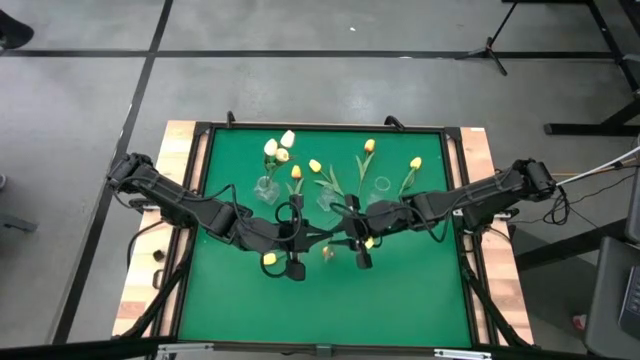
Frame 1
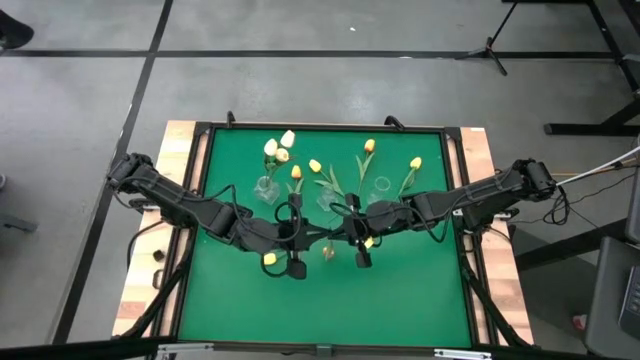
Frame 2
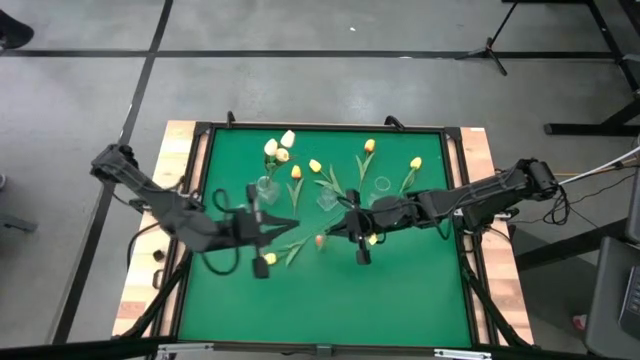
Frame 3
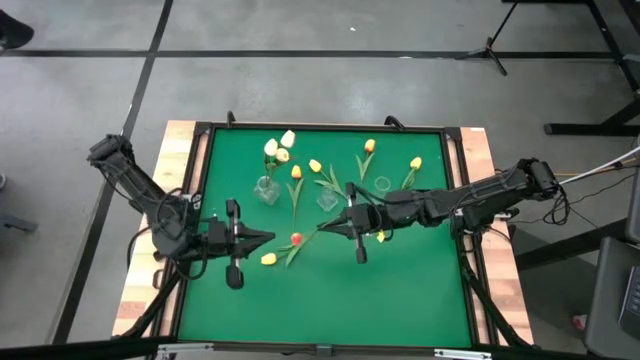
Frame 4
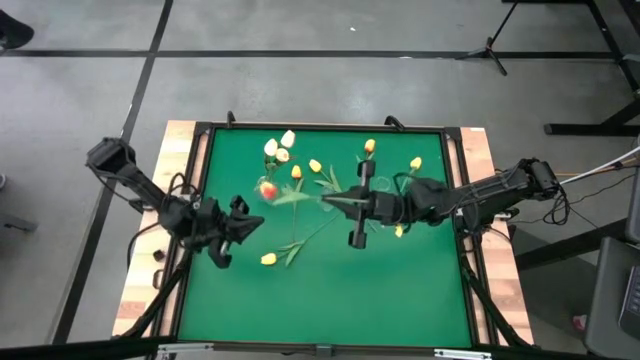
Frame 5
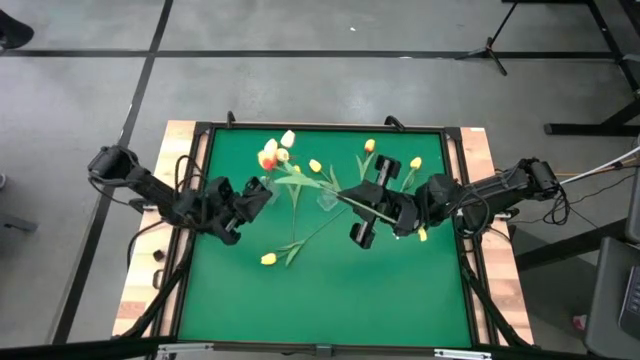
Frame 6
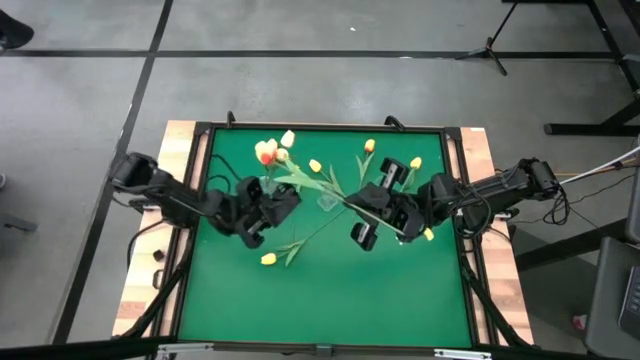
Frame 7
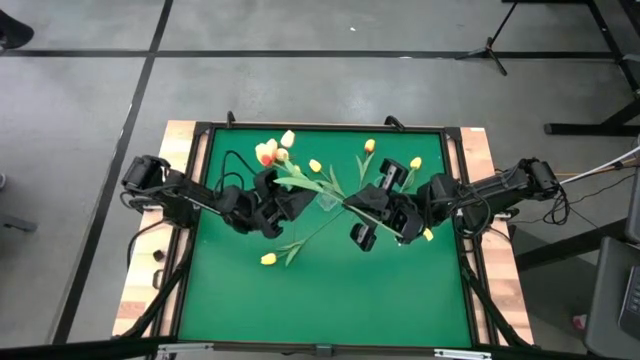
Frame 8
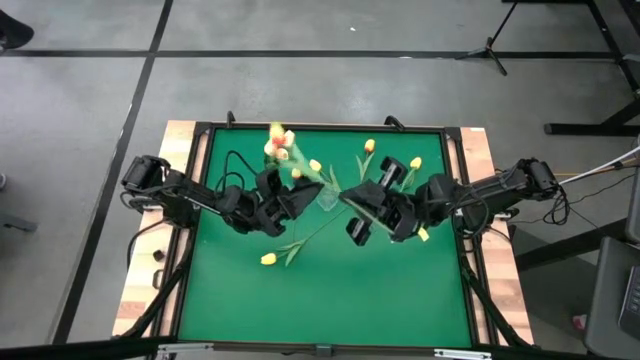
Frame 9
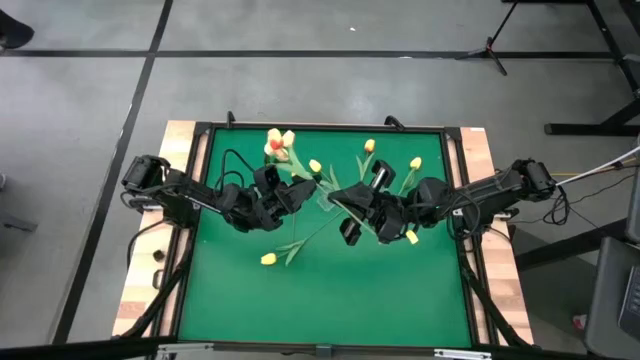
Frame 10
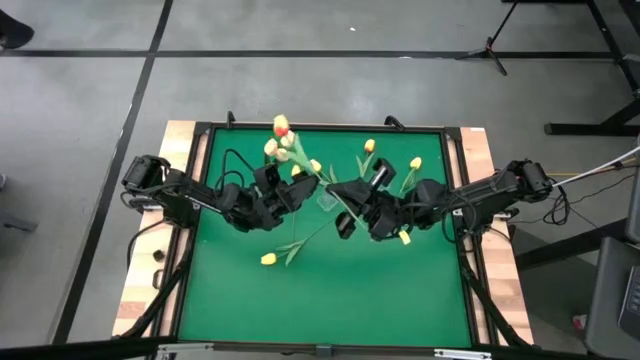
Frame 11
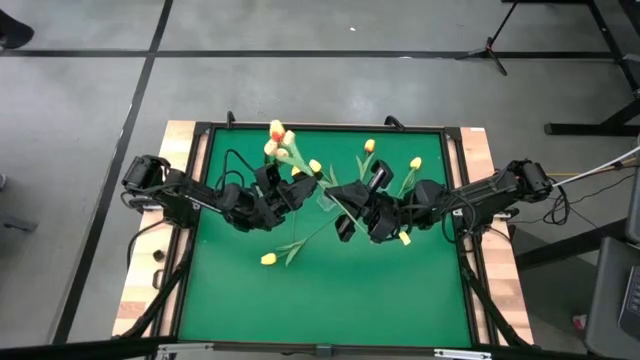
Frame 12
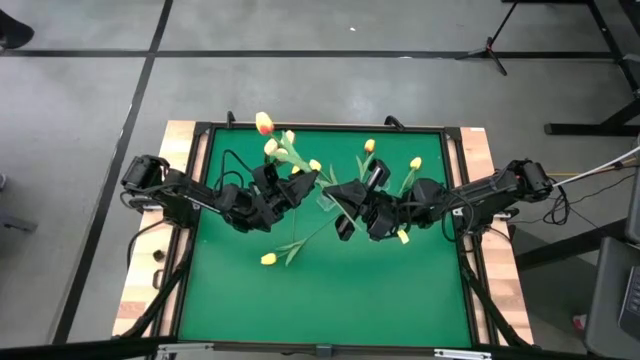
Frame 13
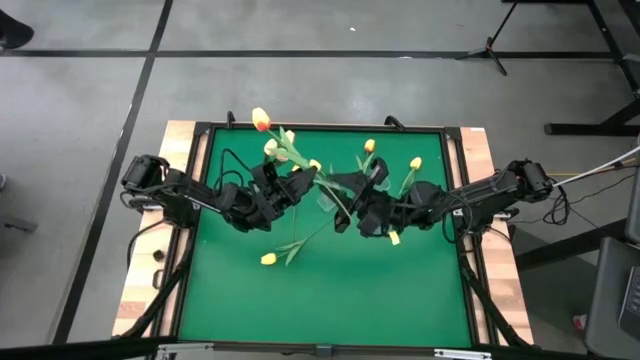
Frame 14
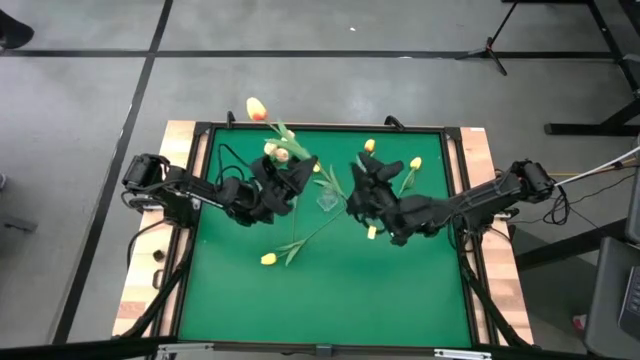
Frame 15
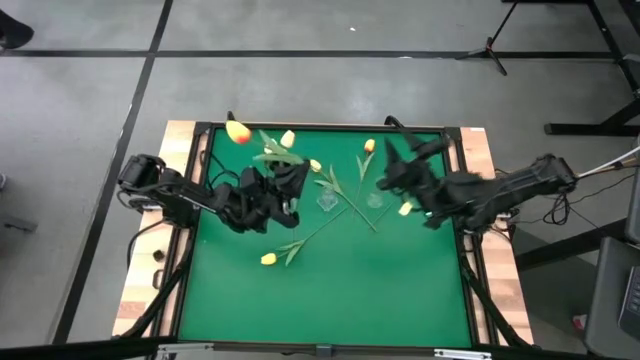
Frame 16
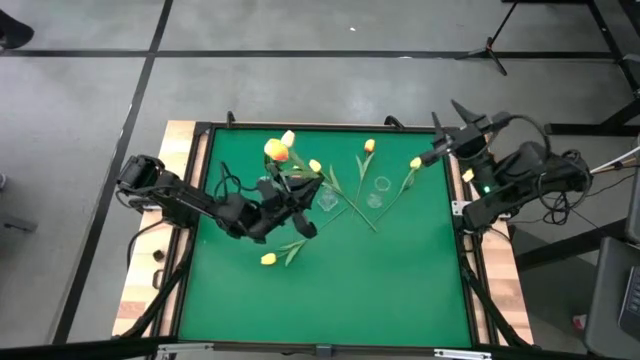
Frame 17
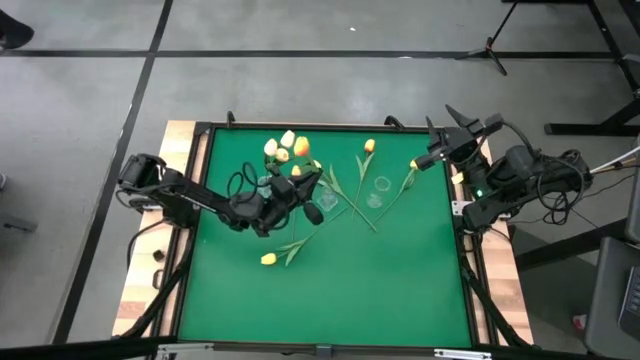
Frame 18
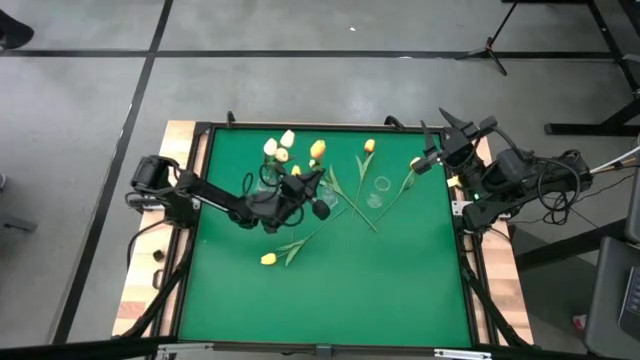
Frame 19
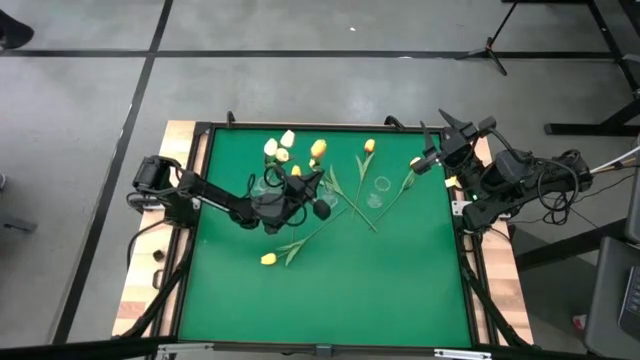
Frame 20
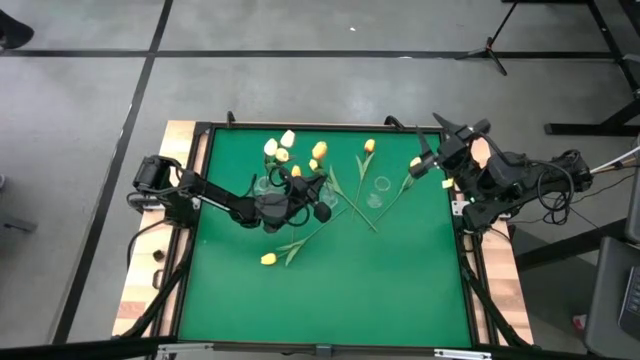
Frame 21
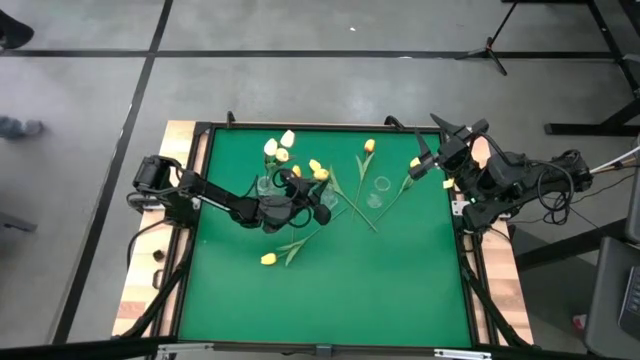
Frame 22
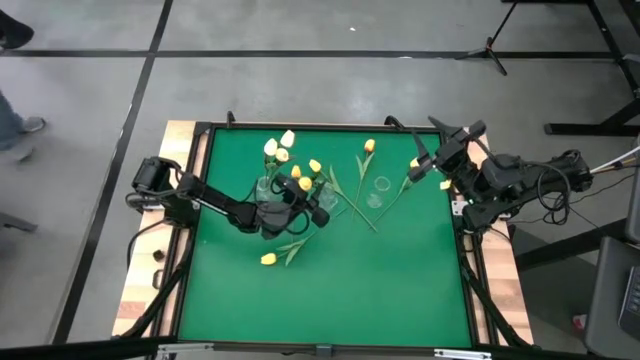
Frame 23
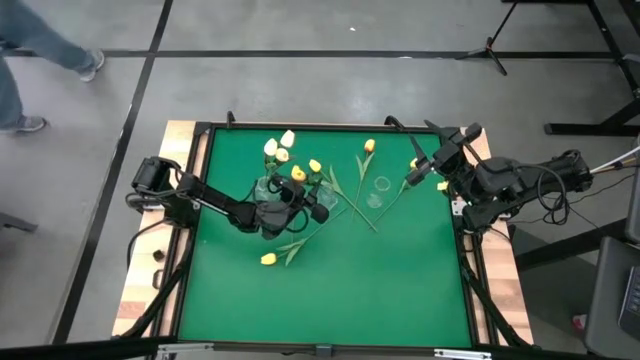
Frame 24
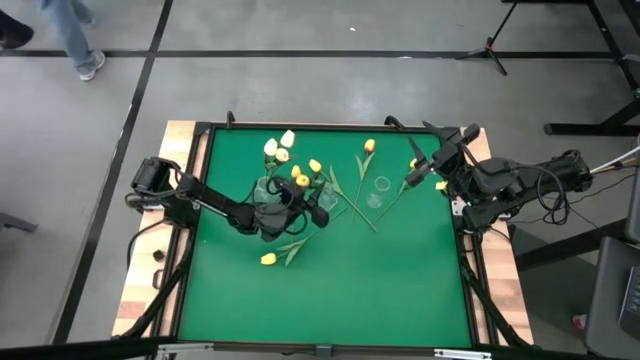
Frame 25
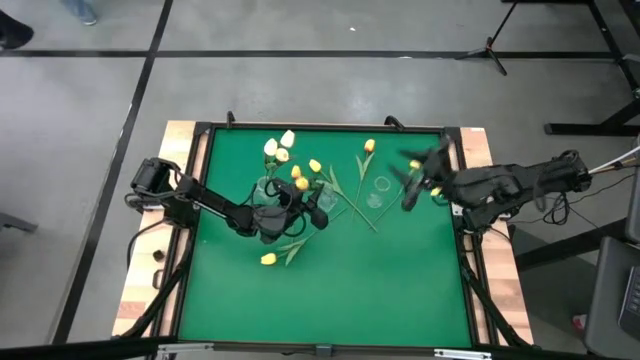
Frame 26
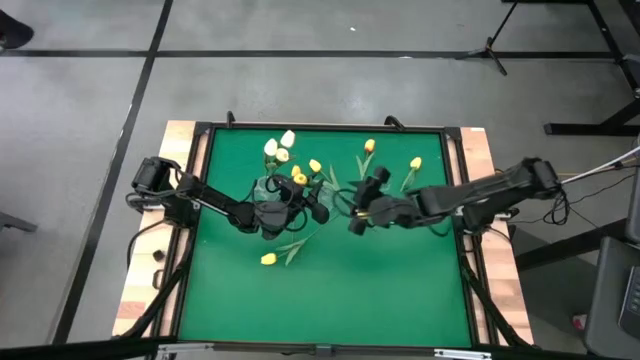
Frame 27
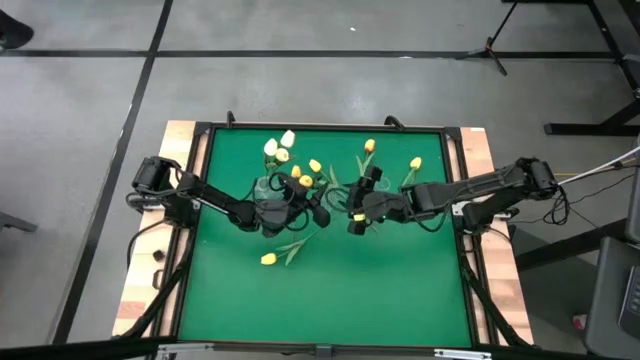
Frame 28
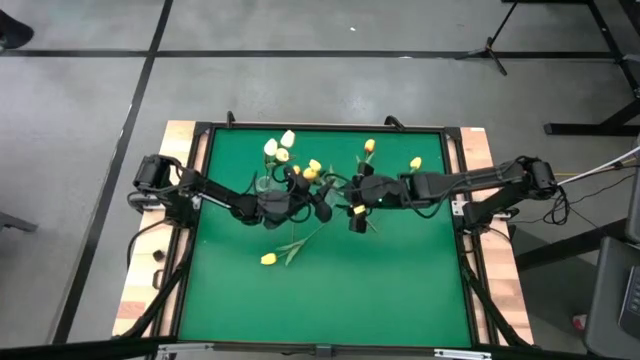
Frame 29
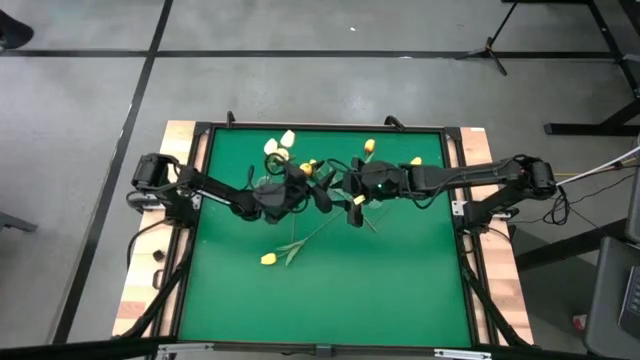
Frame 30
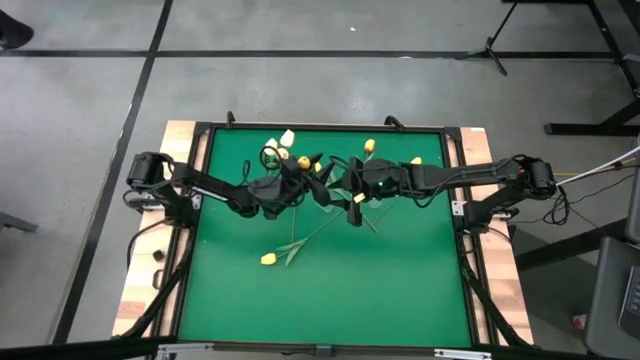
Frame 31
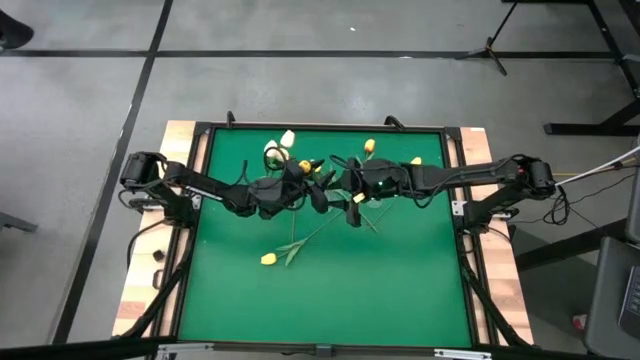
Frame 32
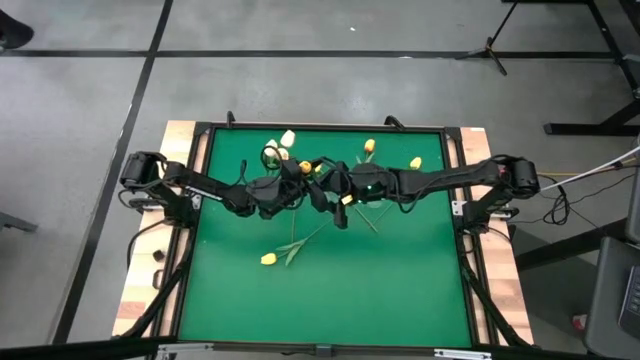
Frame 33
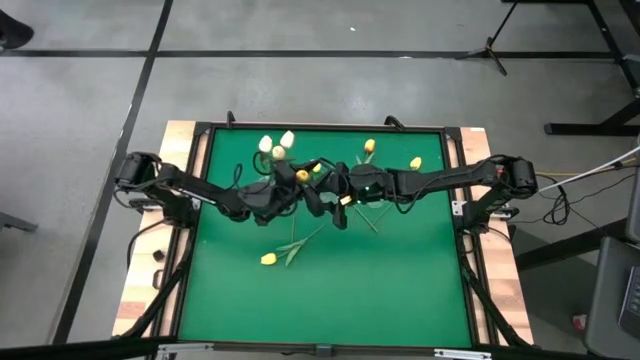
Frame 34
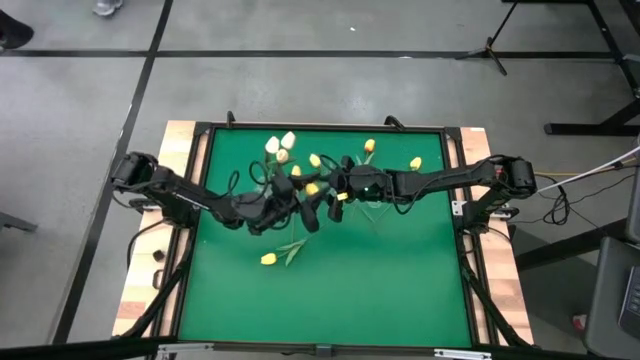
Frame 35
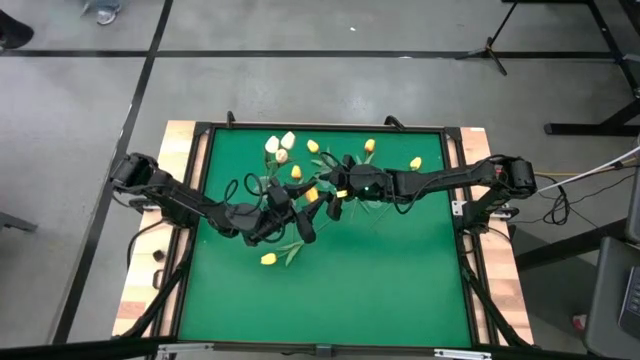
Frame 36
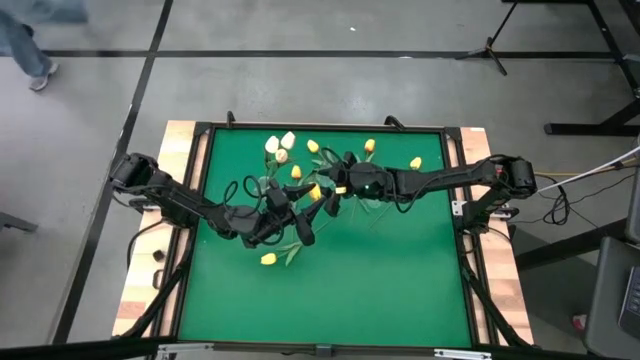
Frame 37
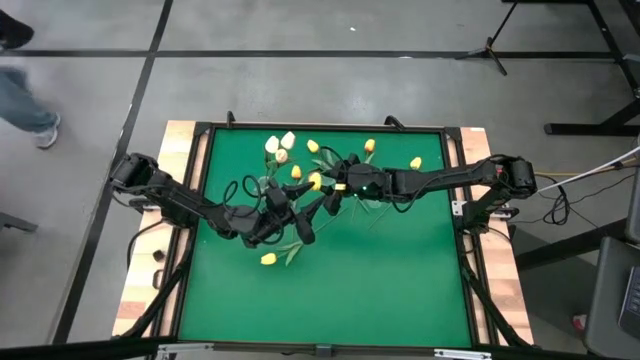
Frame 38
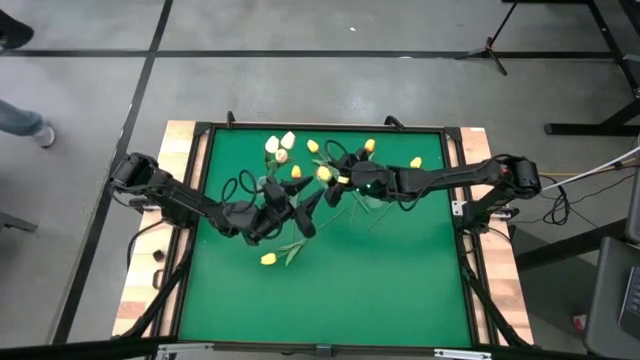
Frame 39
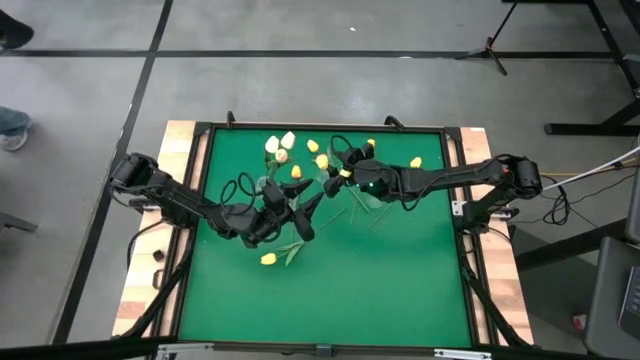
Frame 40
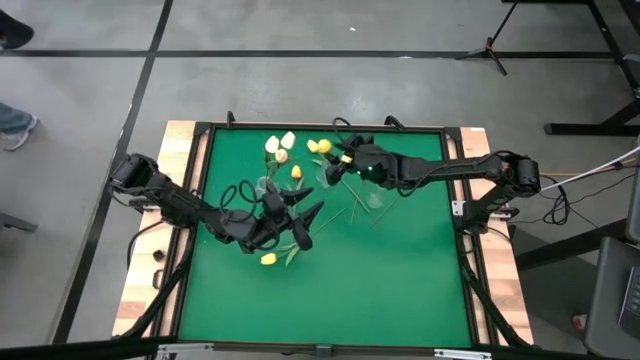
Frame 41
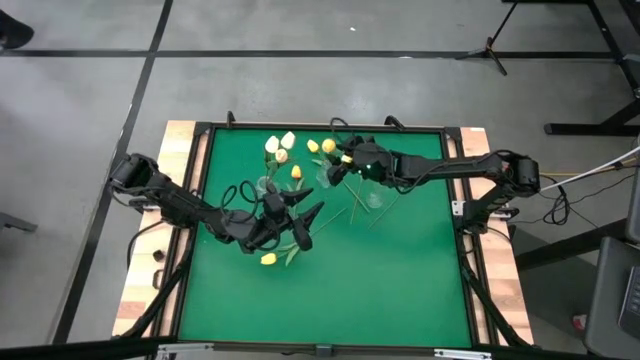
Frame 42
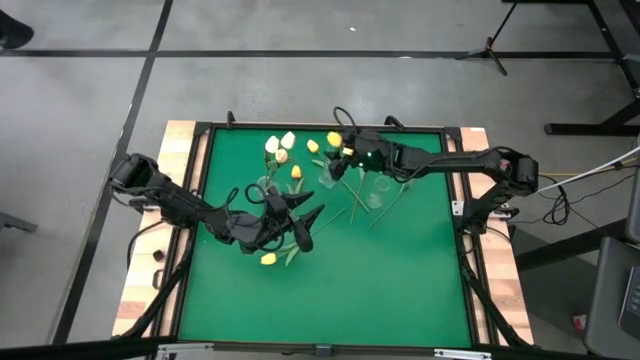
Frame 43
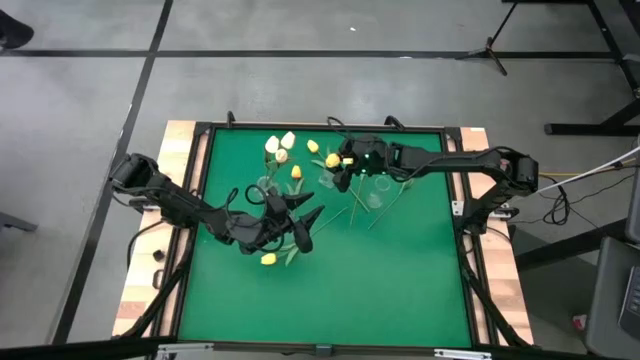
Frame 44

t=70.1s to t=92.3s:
Task: Sort flowers into vase by color
Put the left yellow with orange flower into the center transparent vase
